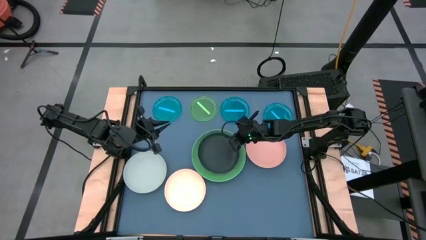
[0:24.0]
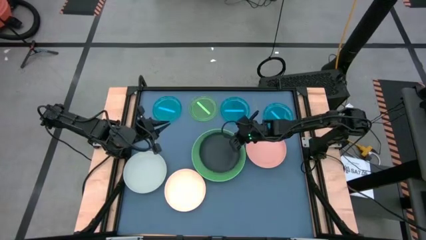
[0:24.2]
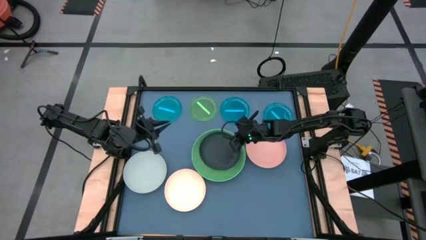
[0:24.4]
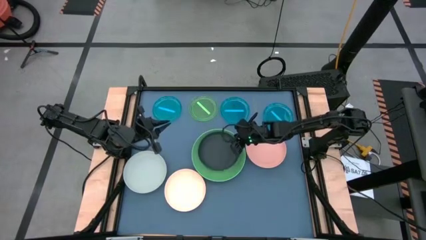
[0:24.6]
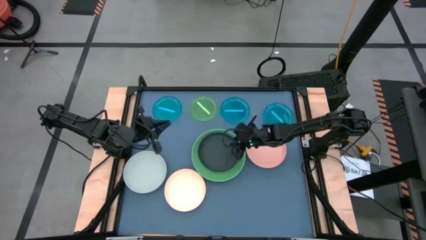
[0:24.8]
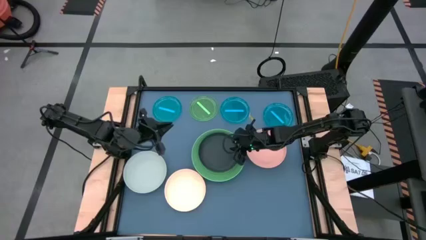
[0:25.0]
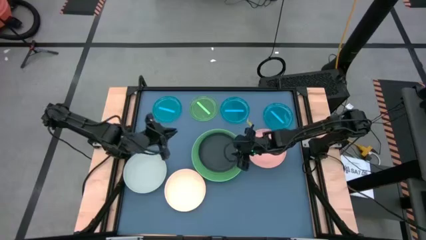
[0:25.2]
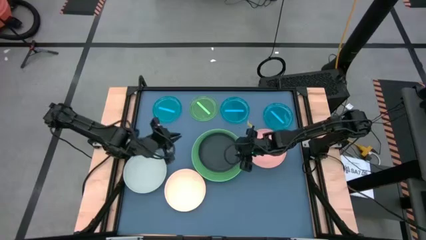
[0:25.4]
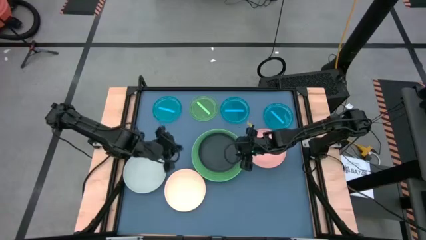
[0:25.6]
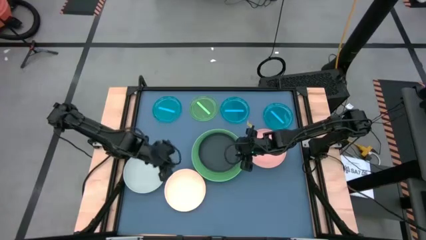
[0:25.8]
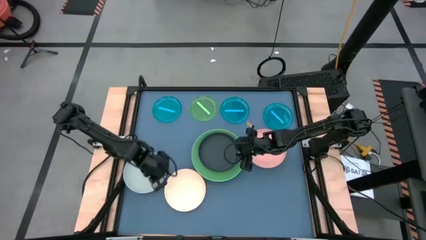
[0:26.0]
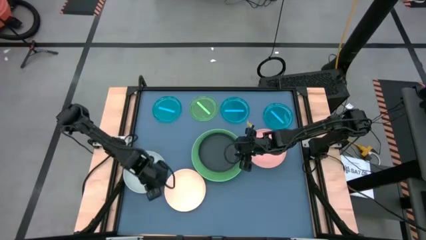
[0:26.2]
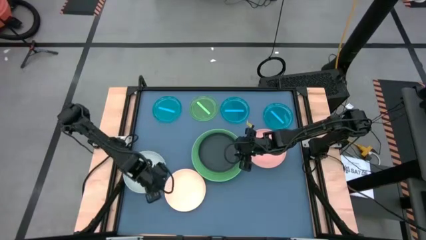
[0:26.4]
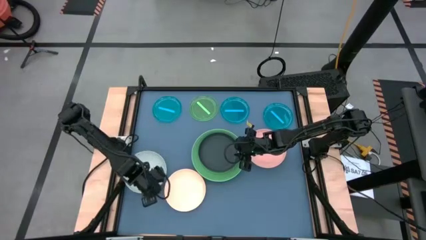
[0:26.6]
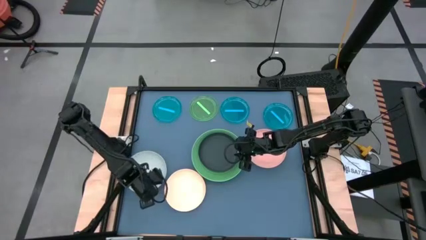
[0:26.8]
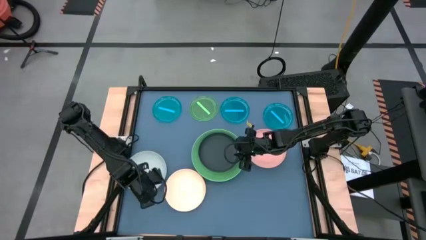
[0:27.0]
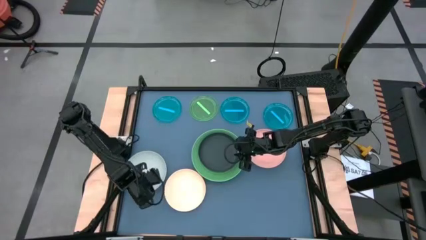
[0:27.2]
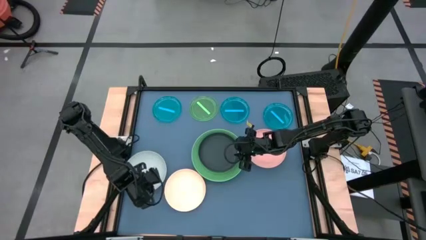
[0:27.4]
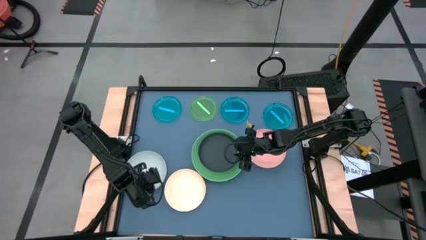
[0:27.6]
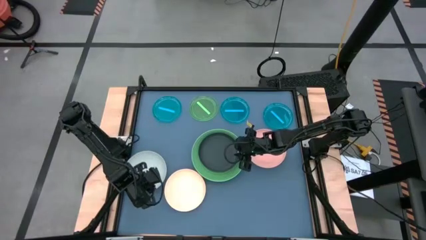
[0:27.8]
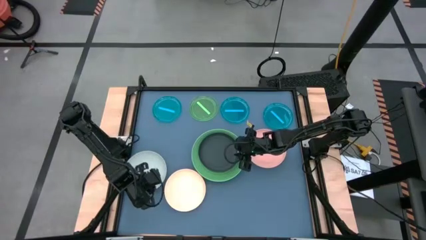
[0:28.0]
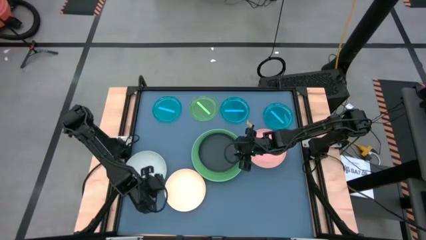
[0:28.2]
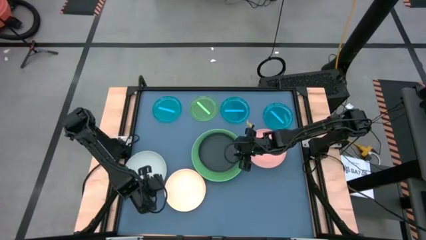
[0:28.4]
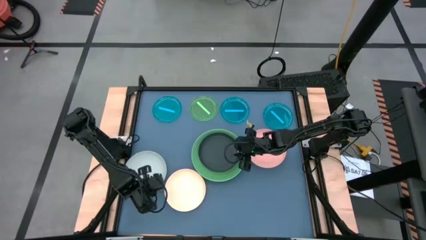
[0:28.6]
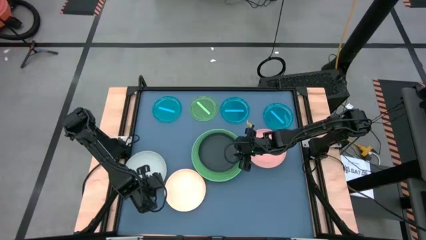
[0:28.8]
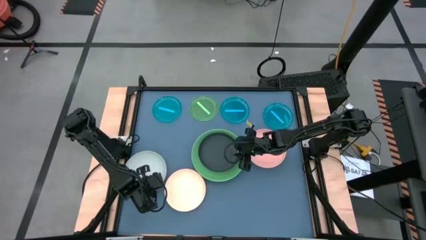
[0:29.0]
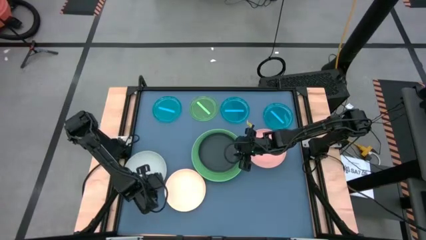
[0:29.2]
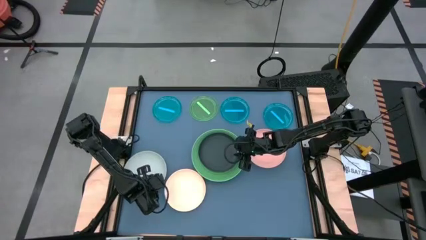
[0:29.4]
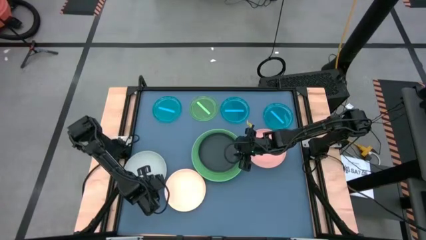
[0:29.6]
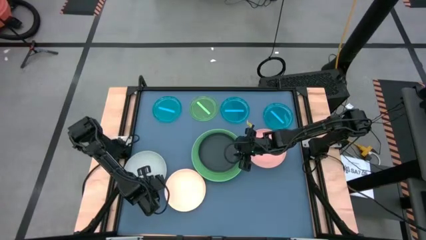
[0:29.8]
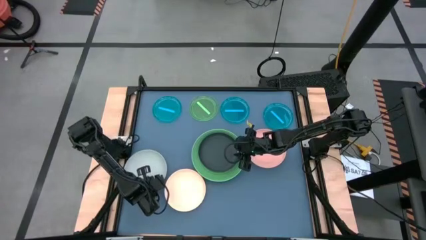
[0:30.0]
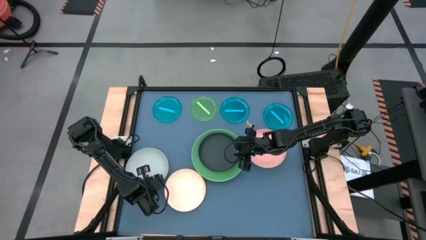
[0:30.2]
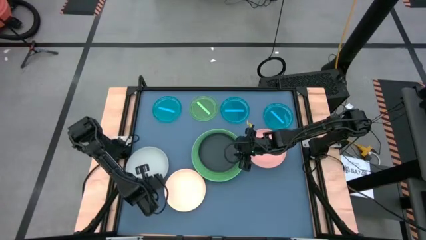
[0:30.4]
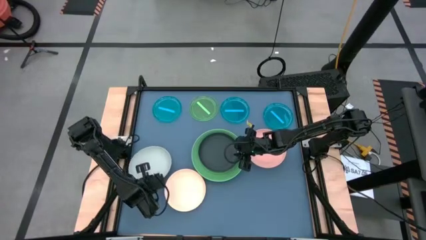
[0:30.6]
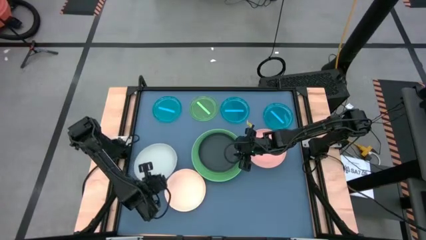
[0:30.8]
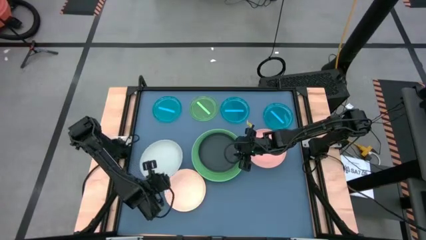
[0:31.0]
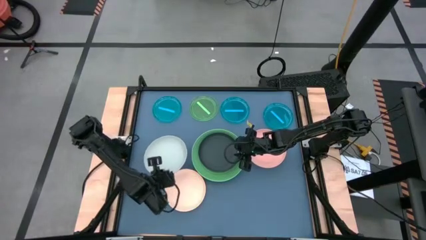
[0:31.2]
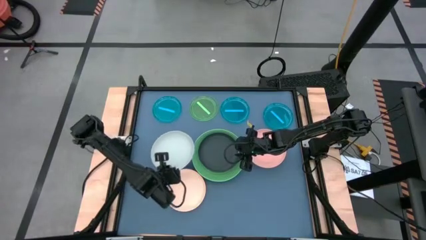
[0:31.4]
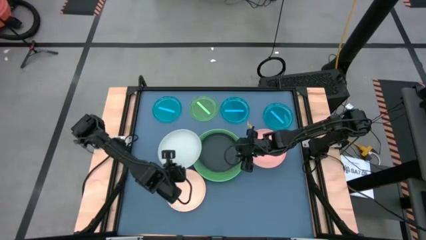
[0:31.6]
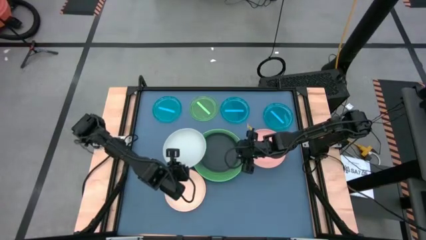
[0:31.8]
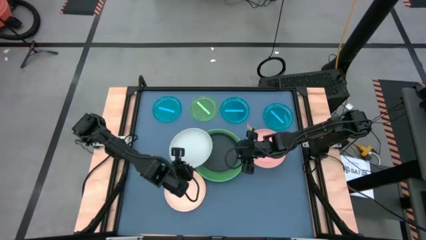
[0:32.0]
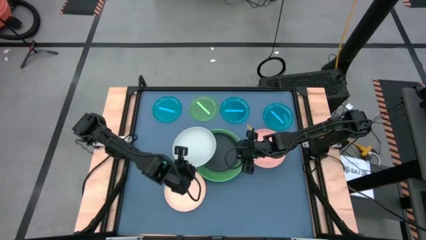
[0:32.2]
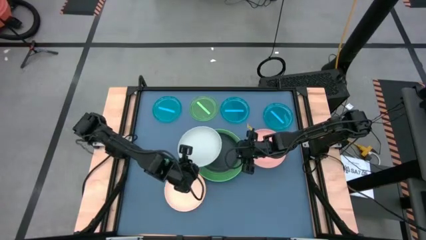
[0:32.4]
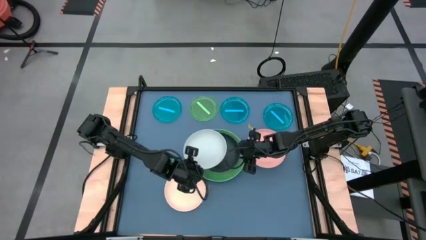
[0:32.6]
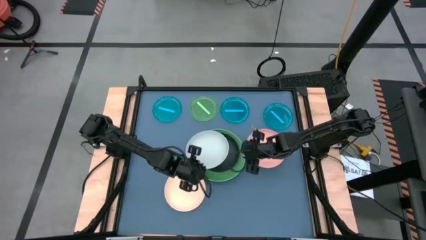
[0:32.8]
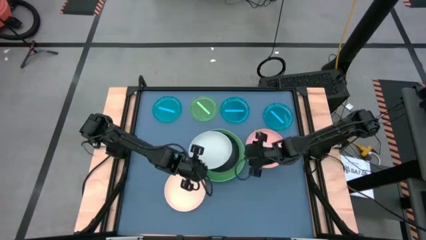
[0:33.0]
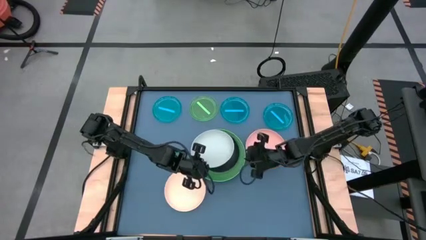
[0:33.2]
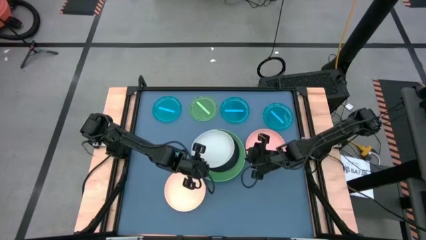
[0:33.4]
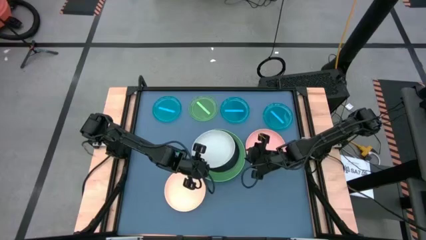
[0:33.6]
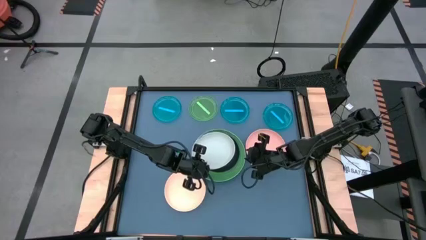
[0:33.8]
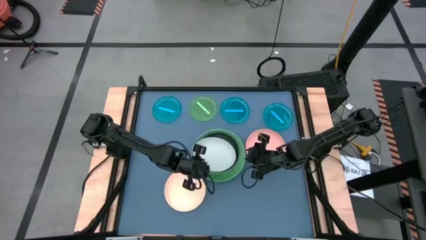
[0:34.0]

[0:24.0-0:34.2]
Task: Stack plastic plates
Stack the gray plate on the black plate

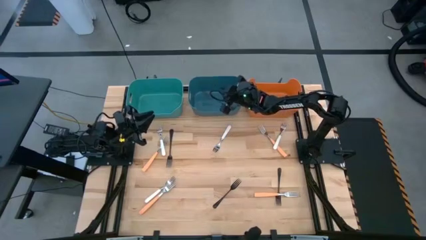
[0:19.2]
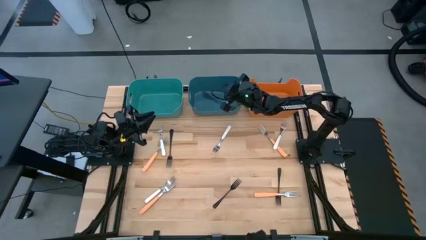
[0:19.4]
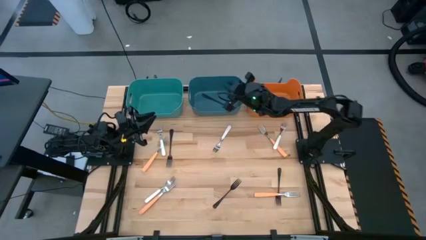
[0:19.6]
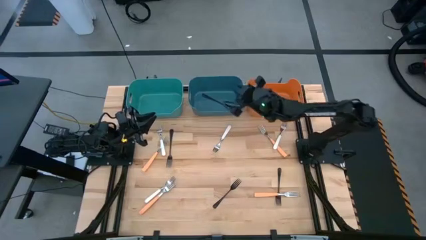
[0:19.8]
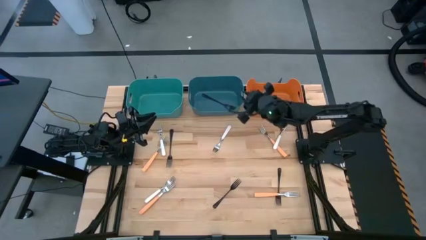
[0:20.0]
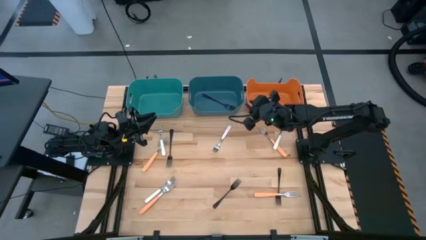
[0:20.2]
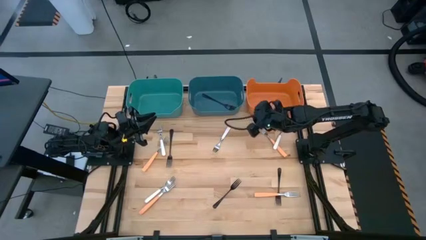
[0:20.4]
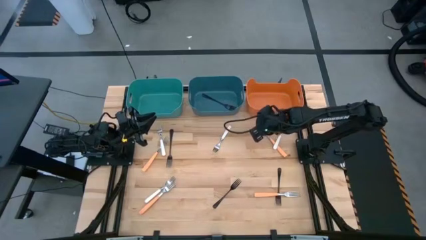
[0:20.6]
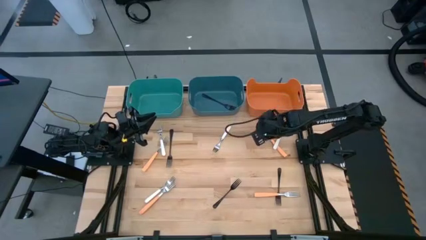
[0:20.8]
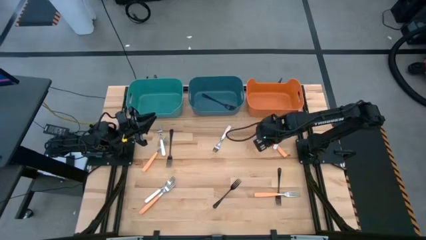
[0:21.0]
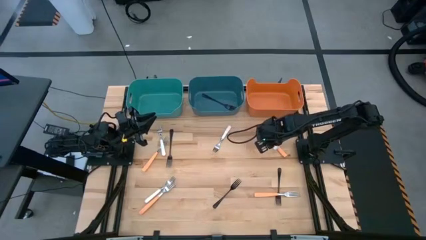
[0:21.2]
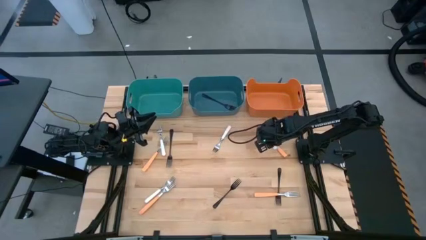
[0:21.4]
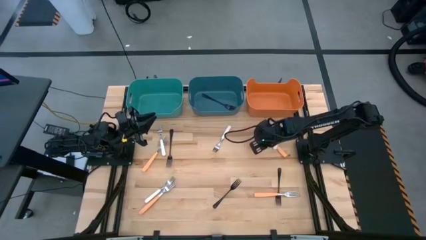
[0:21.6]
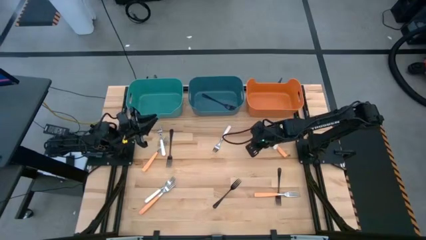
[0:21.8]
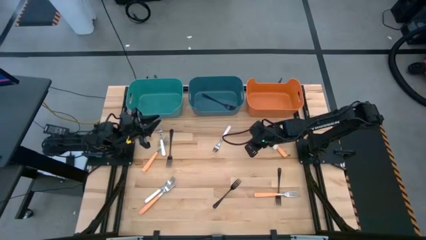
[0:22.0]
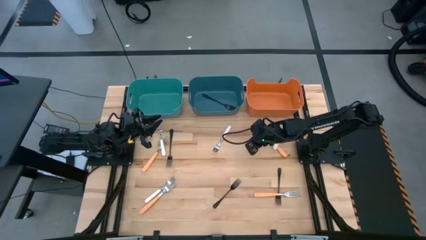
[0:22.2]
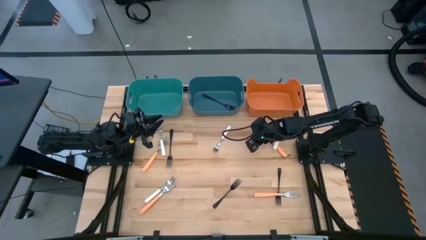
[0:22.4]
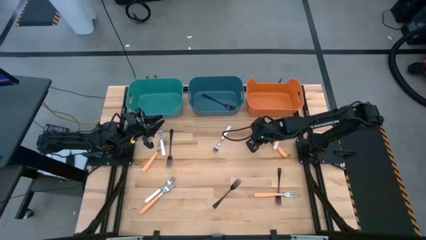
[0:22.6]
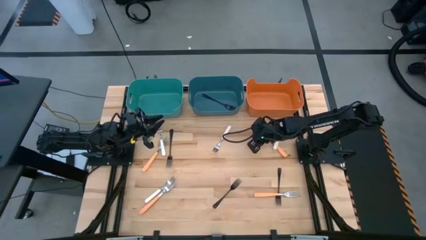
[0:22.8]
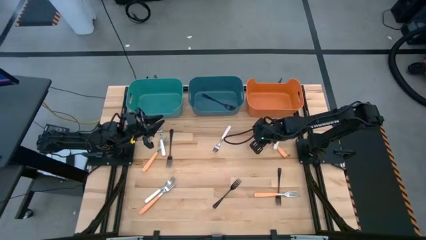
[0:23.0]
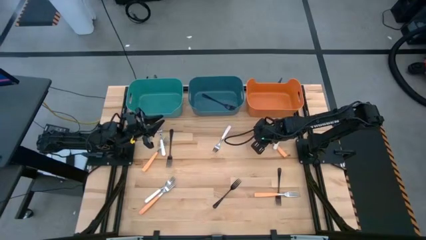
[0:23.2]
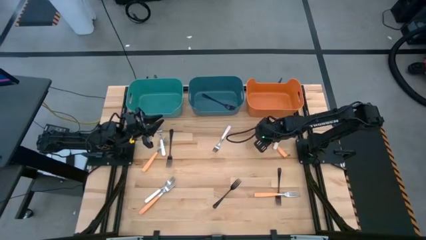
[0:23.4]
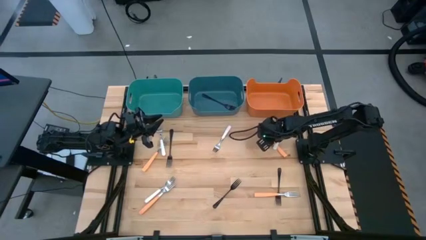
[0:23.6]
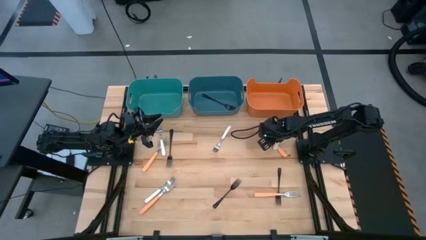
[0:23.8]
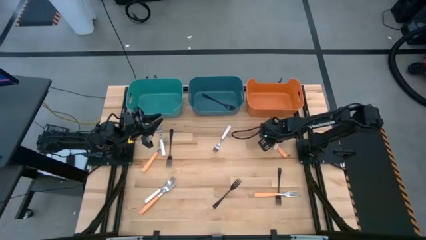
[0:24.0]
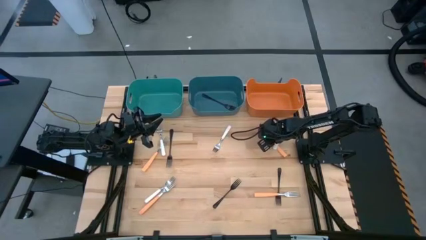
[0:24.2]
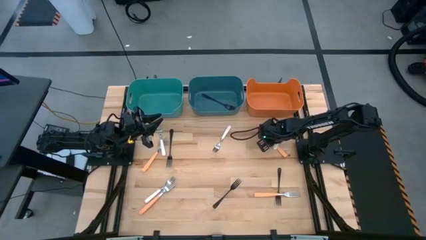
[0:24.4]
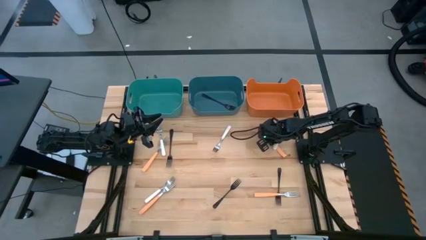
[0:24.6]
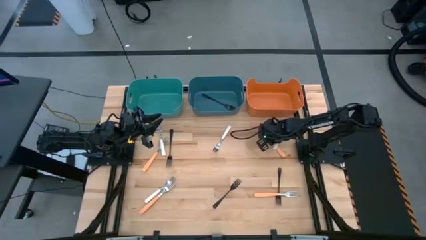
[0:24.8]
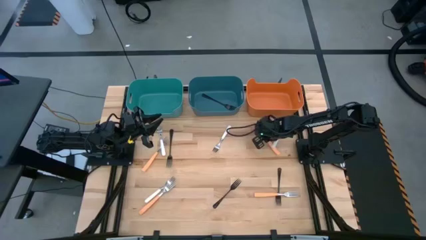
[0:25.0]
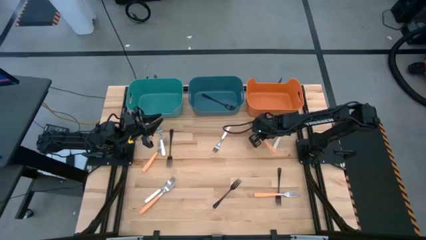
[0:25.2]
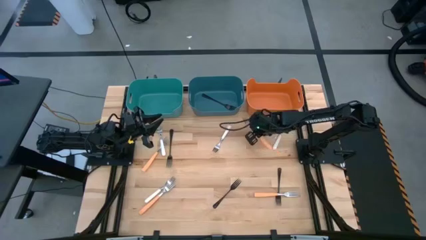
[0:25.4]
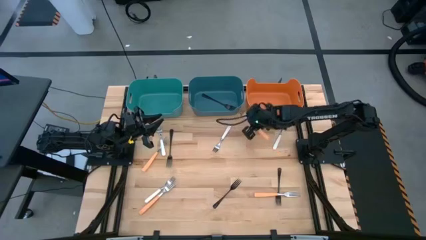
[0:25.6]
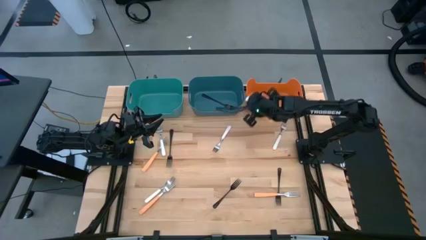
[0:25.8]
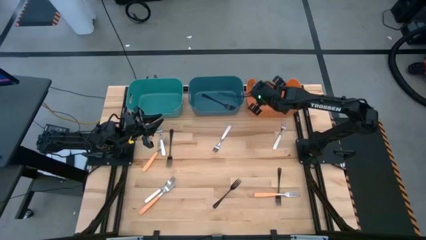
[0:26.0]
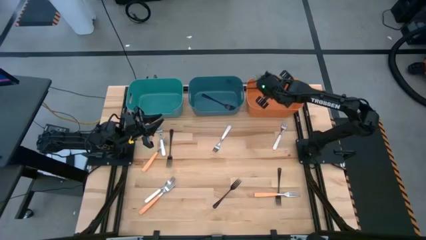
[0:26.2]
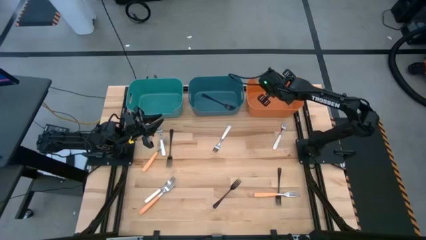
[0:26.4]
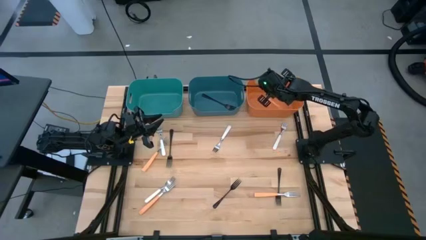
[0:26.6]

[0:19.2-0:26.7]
Task: Sort silverware by color (type)
Put the yellow fork into the orange bin
